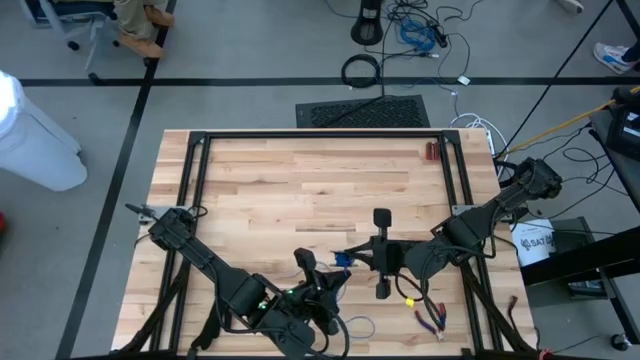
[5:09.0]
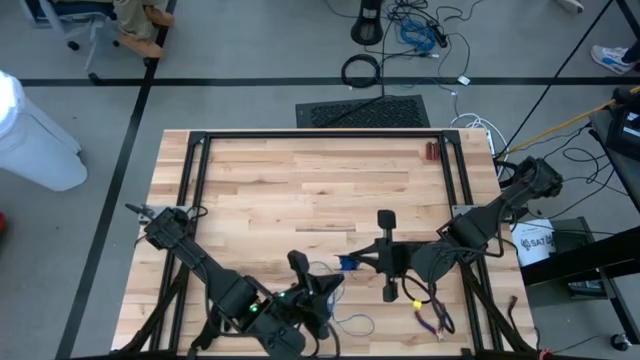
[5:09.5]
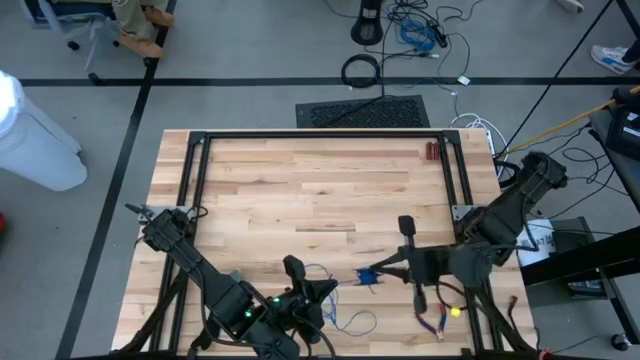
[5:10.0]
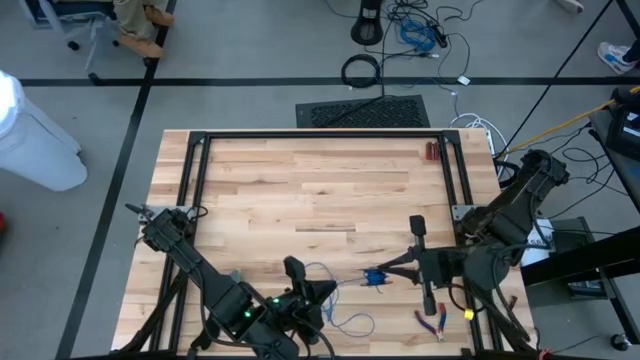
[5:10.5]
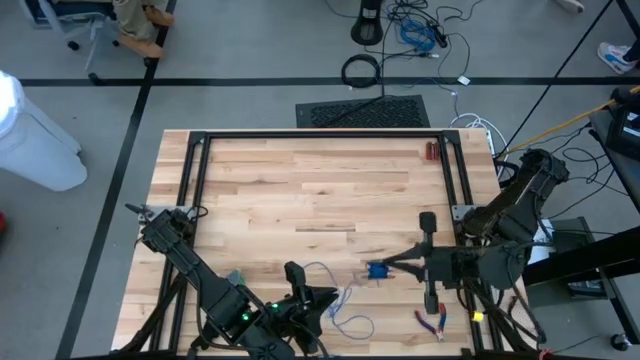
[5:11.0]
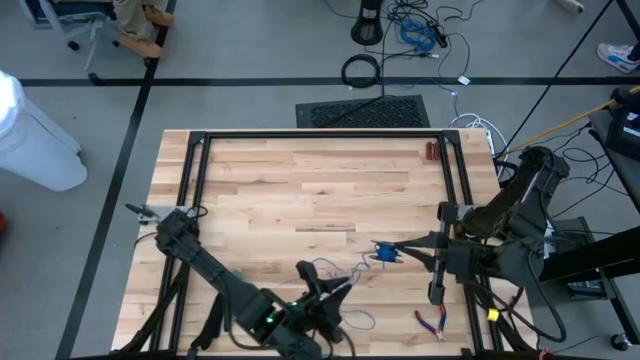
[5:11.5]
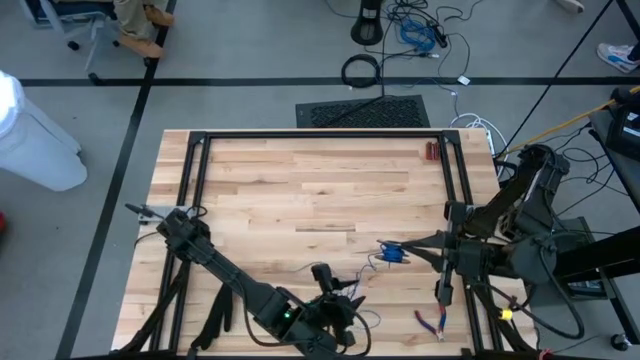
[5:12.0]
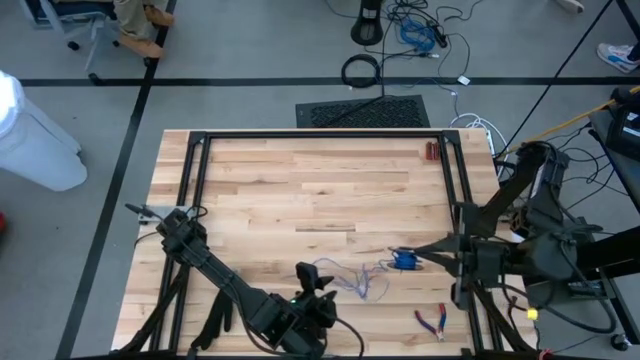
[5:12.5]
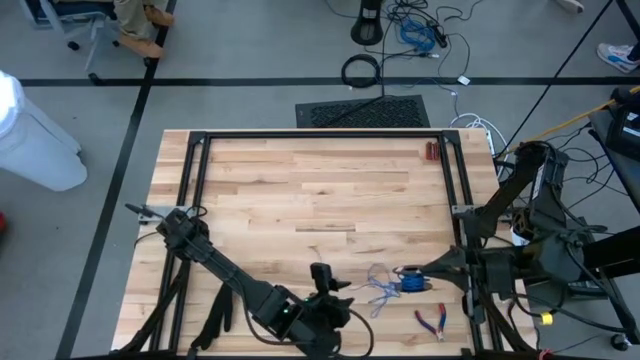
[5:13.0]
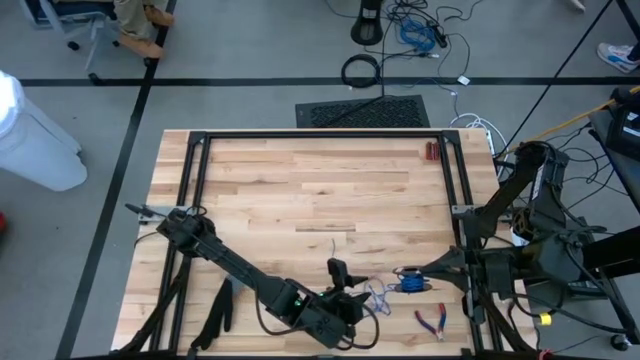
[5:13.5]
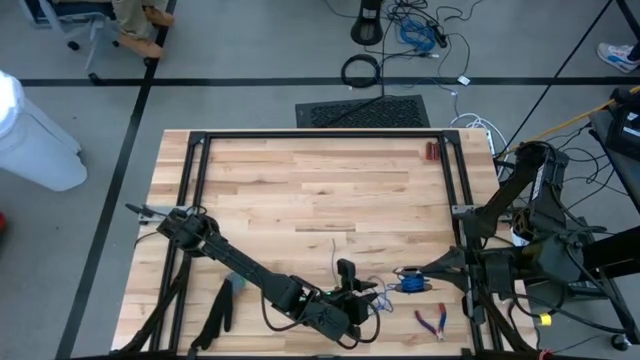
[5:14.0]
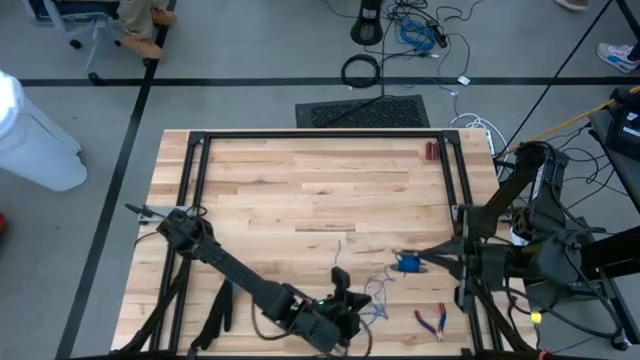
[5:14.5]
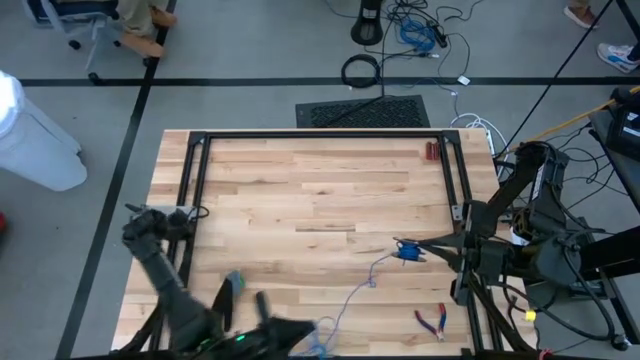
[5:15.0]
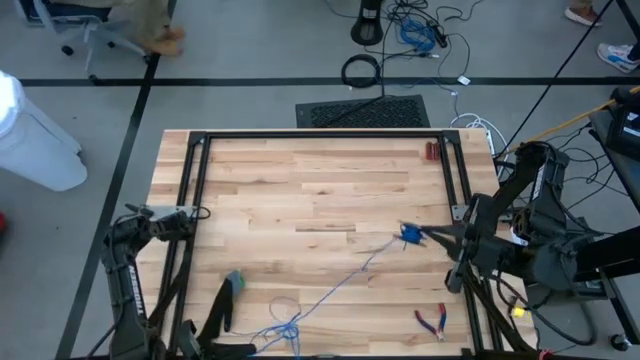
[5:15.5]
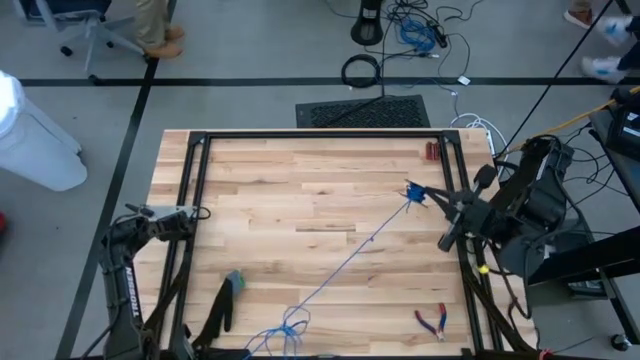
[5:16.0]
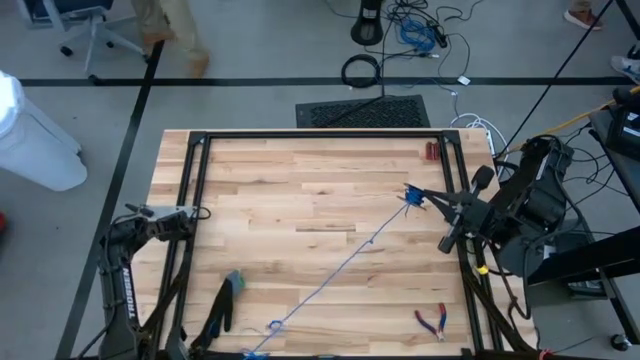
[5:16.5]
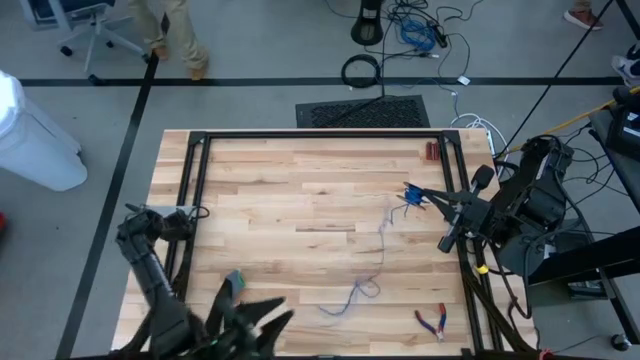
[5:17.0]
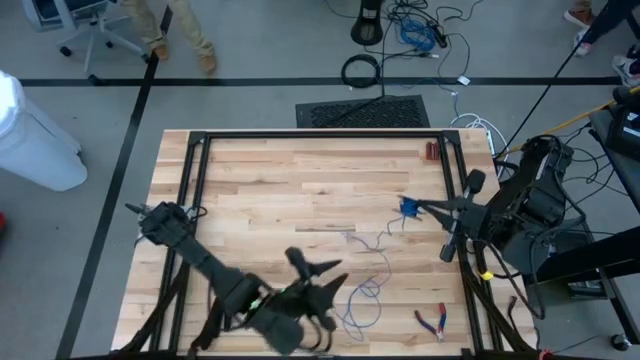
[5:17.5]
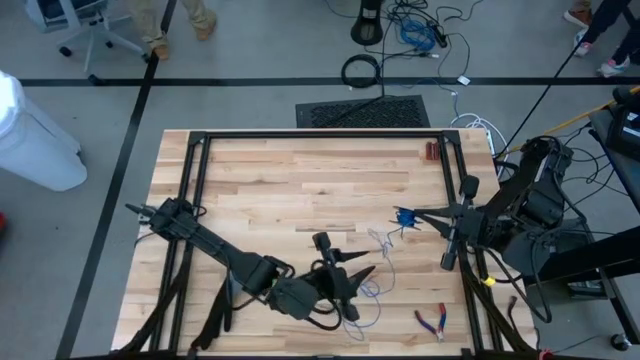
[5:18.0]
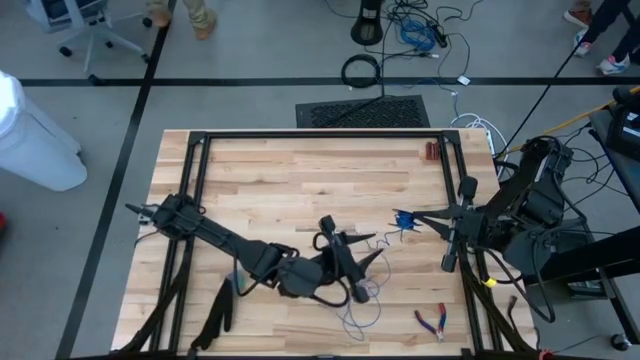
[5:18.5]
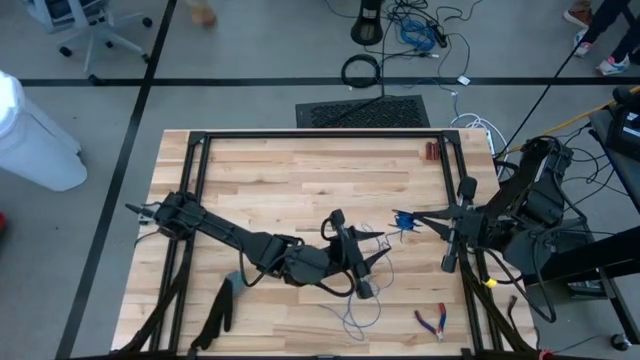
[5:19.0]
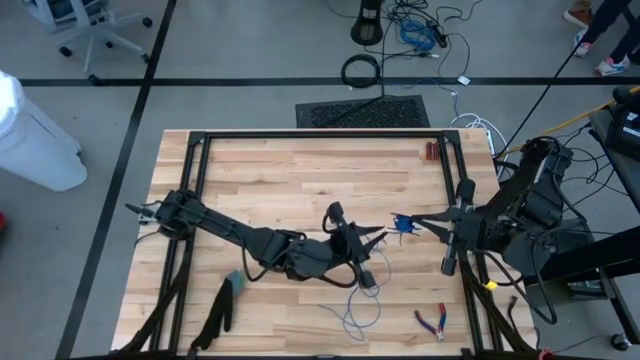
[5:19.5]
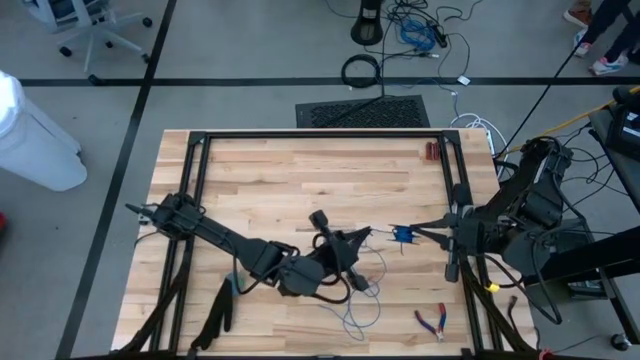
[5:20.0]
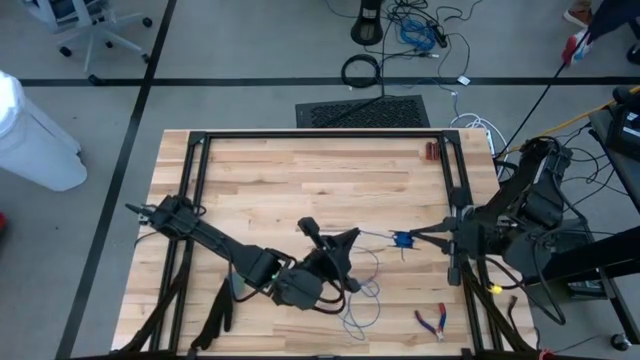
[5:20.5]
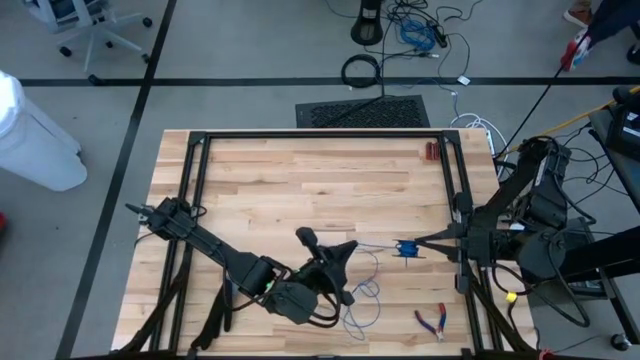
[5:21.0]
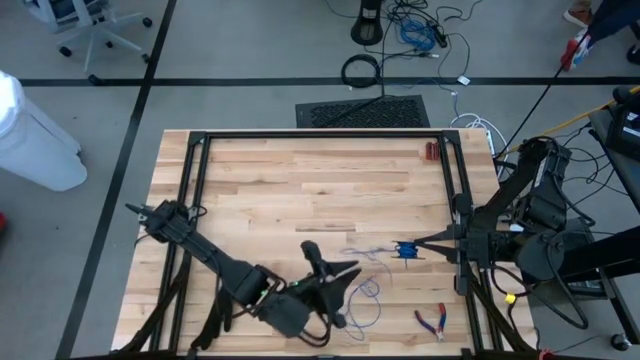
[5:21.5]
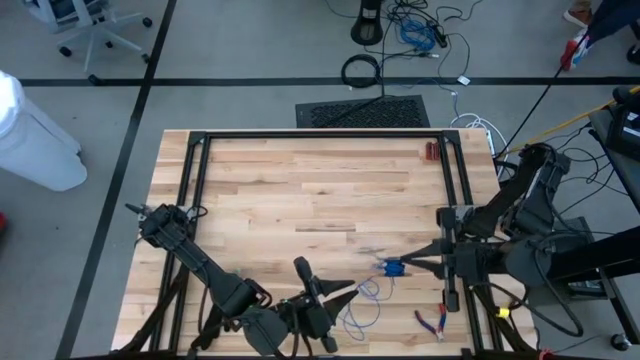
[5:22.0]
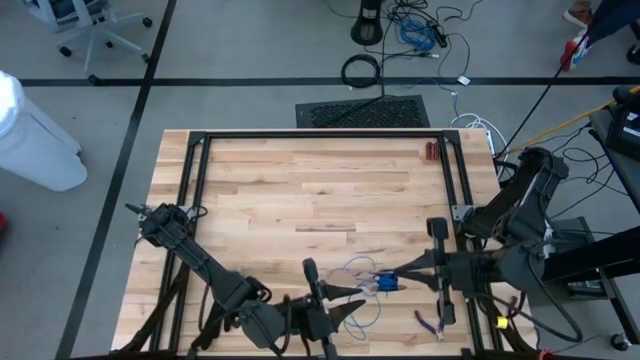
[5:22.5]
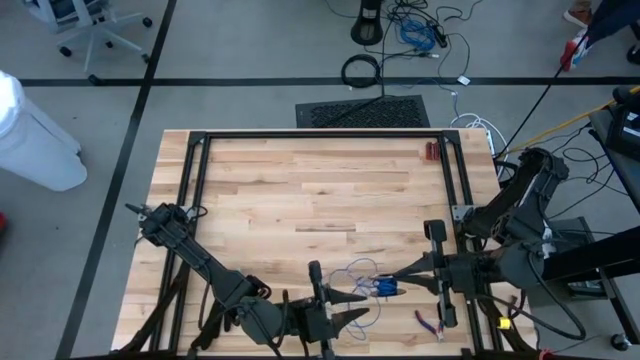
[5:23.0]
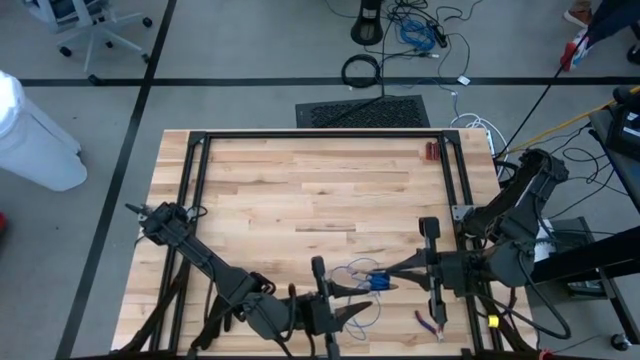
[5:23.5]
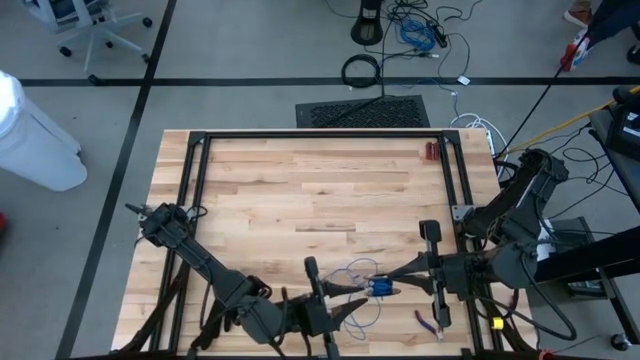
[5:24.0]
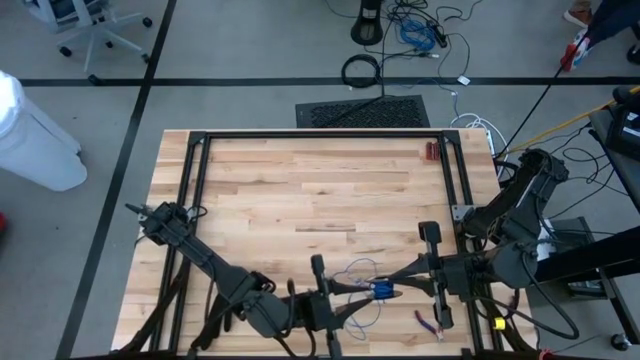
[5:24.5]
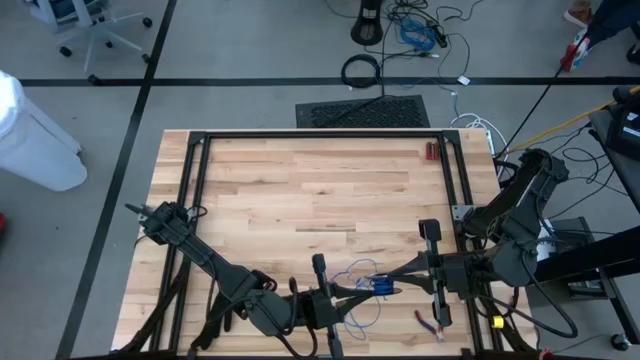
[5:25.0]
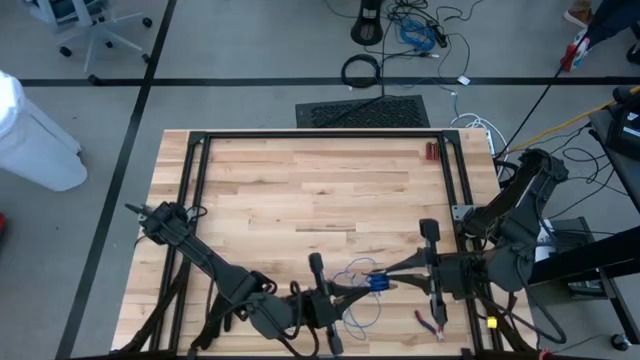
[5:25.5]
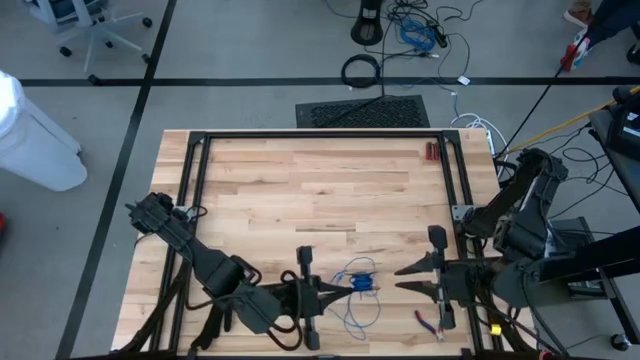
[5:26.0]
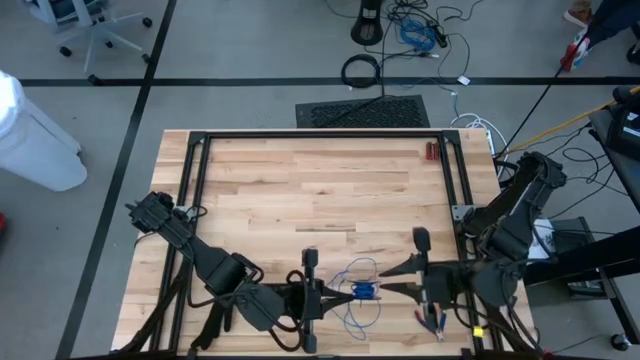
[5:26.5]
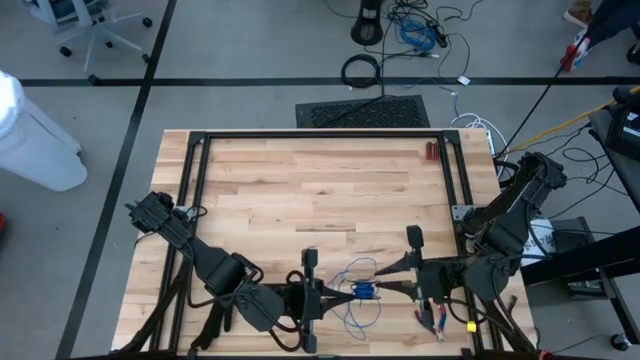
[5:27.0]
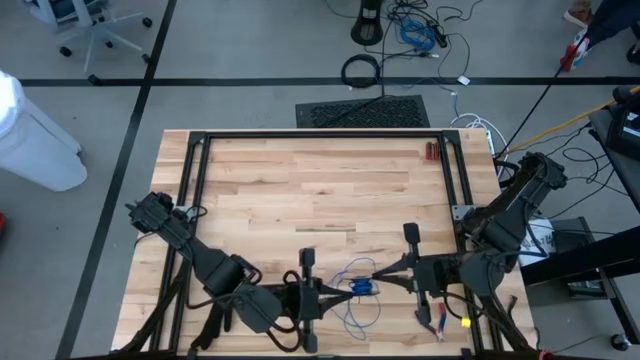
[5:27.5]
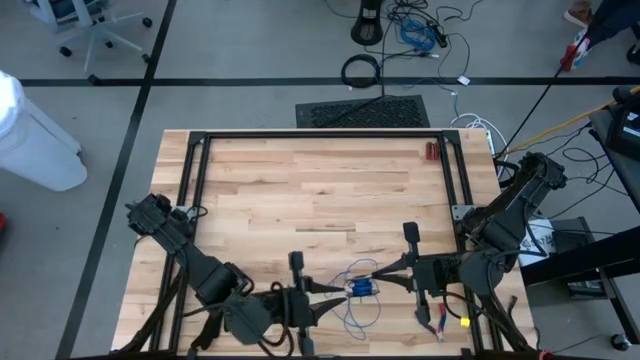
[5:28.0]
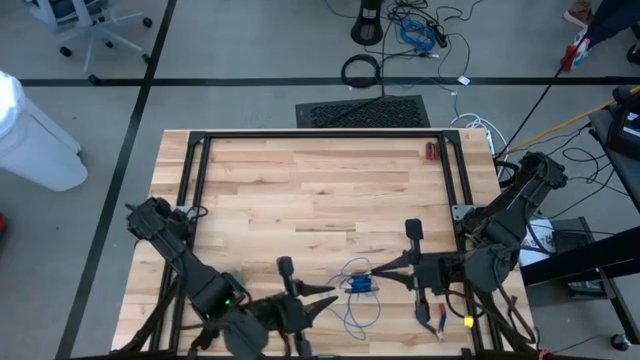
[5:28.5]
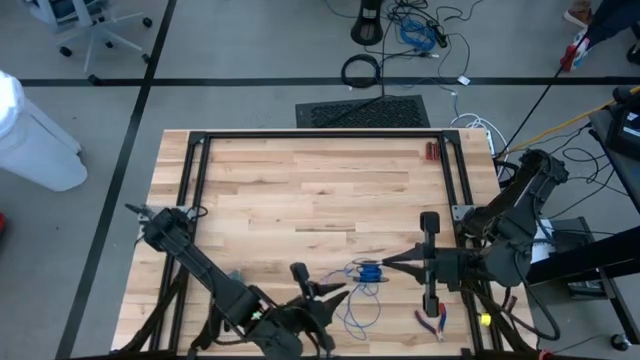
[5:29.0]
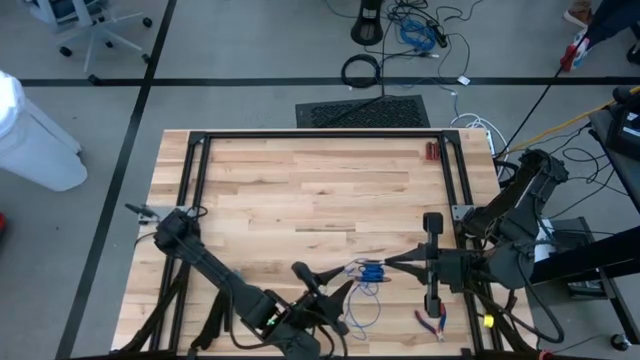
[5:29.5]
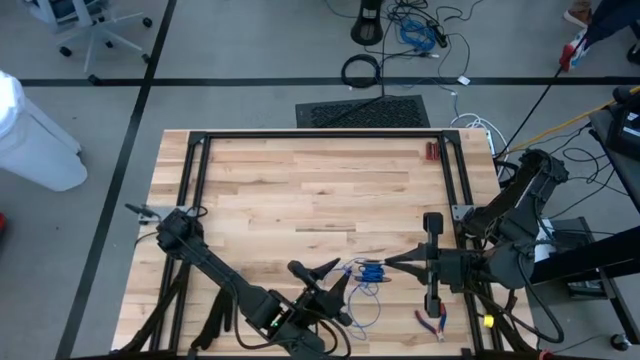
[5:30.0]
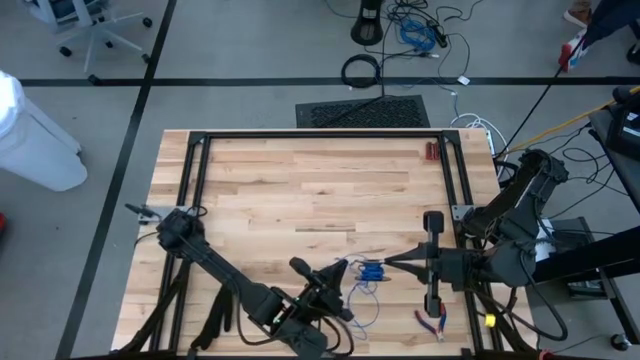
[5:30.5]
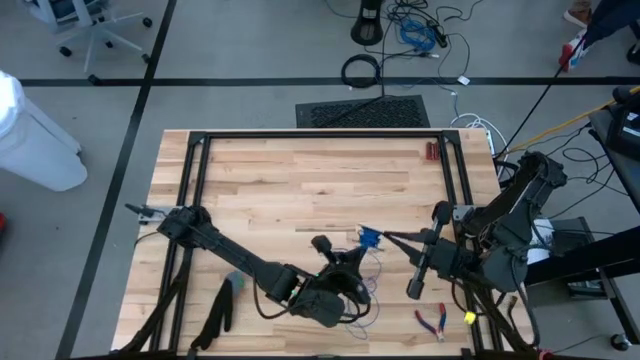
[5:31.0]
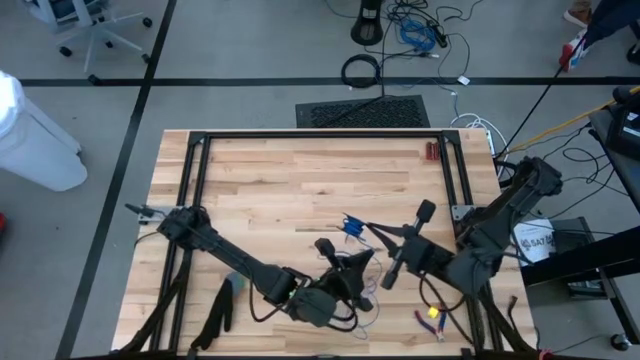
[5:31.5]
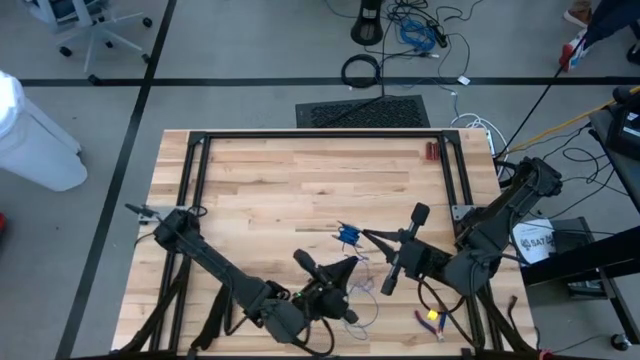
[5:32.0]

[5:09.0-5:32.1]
Task: Coil cords
Coil the blue wire onto the black spool
